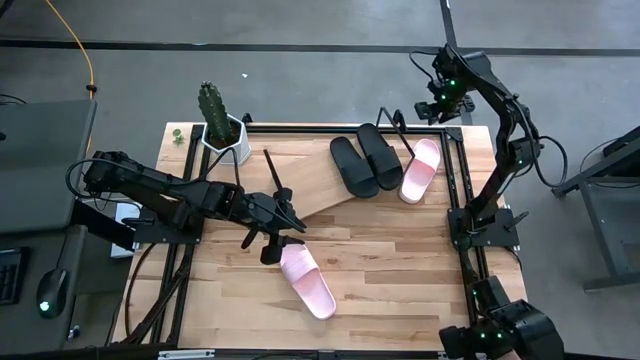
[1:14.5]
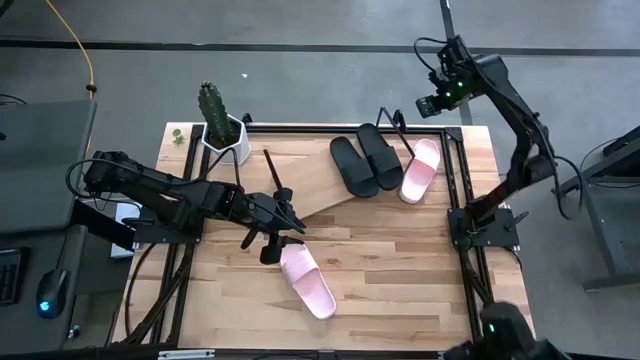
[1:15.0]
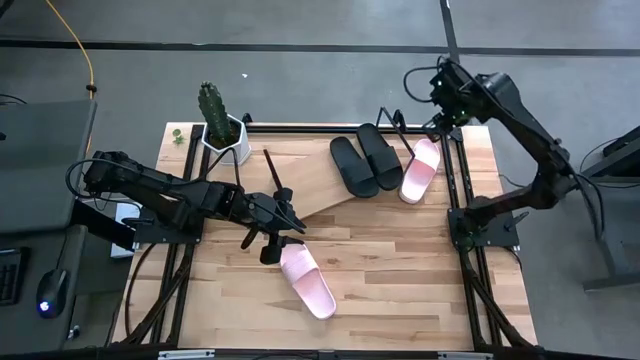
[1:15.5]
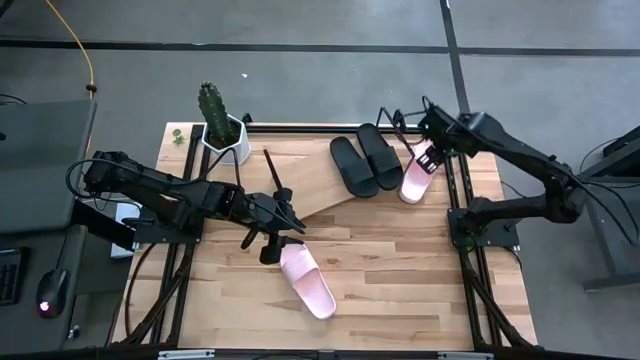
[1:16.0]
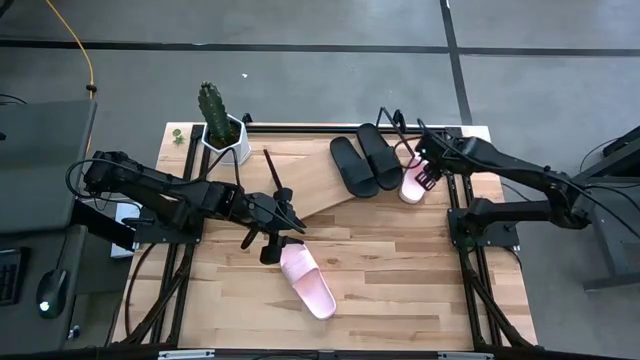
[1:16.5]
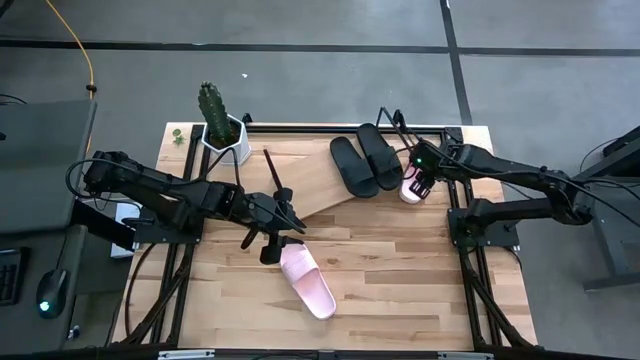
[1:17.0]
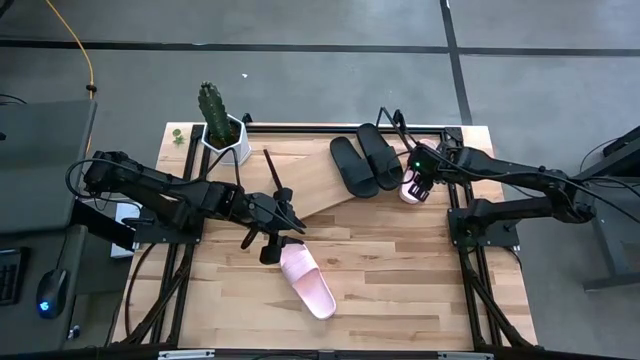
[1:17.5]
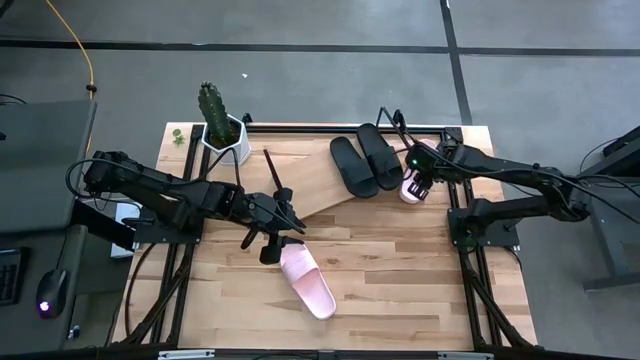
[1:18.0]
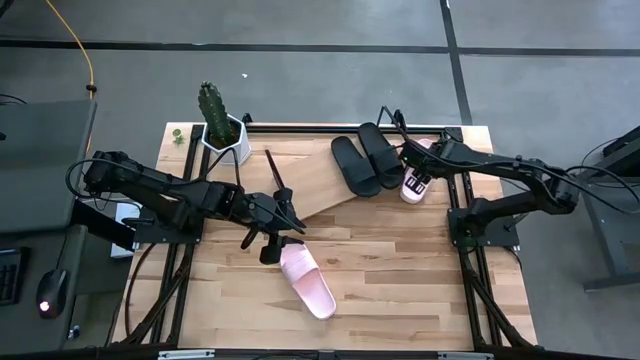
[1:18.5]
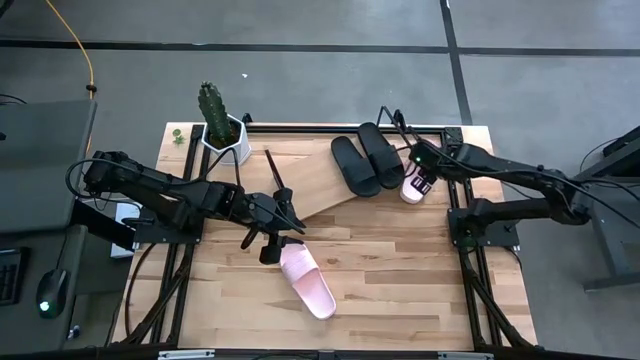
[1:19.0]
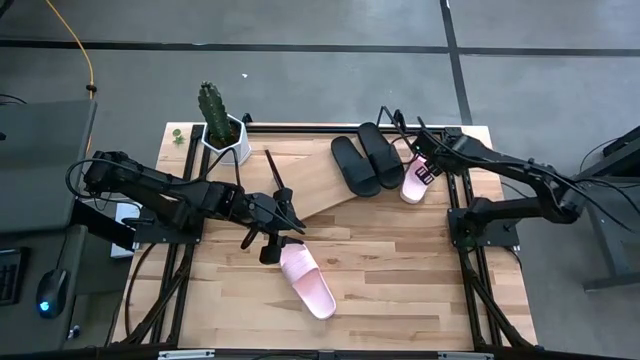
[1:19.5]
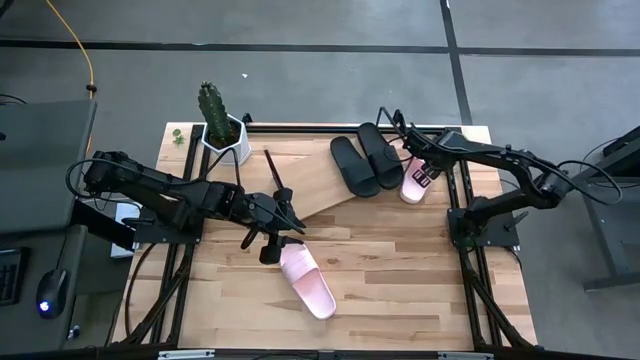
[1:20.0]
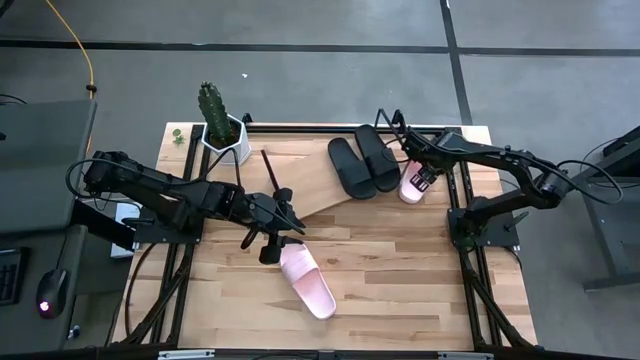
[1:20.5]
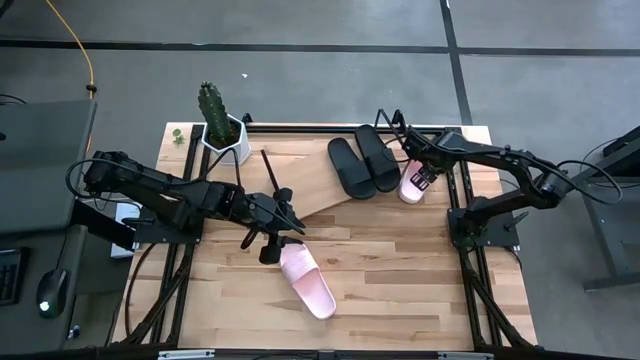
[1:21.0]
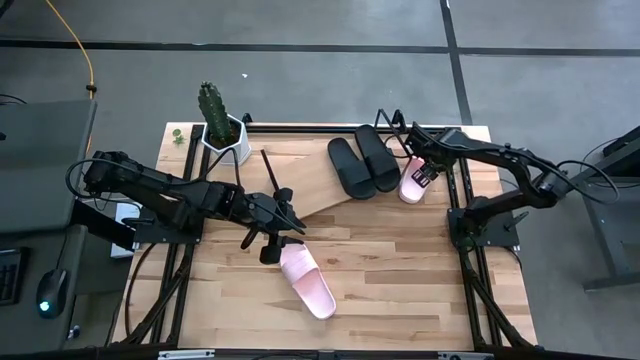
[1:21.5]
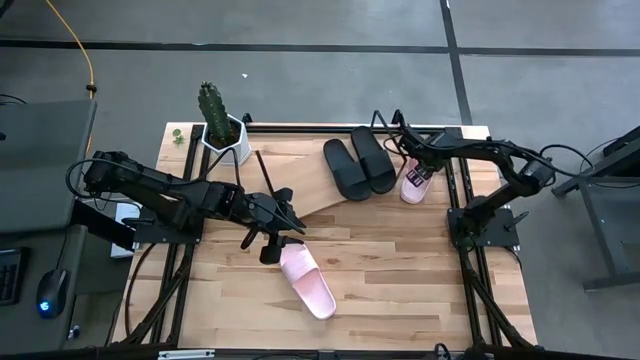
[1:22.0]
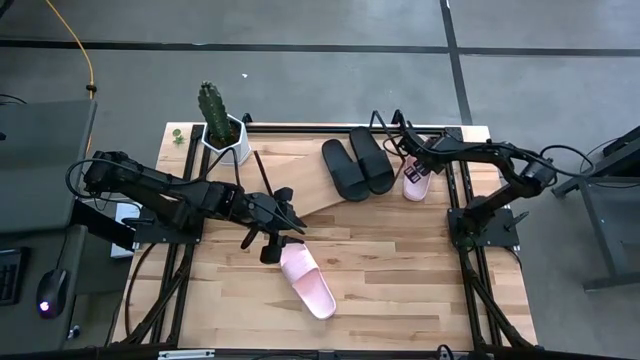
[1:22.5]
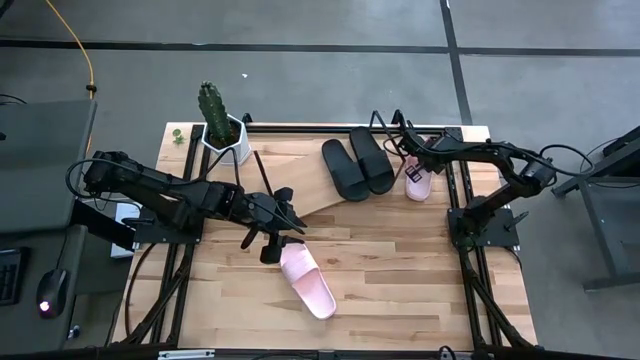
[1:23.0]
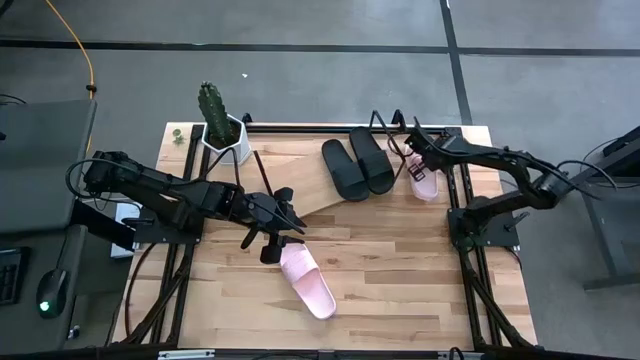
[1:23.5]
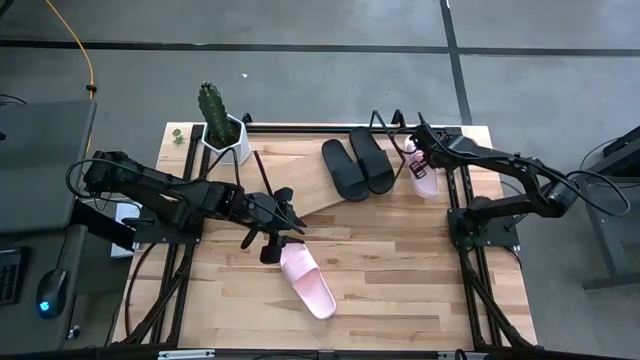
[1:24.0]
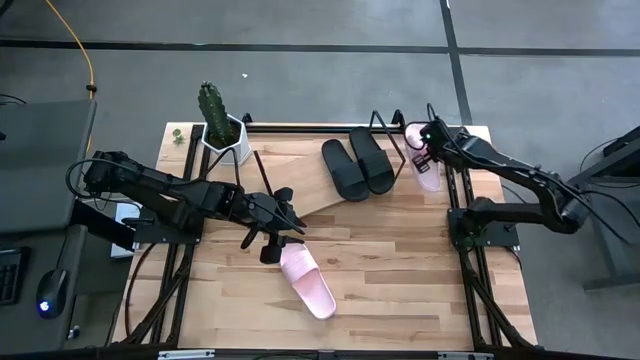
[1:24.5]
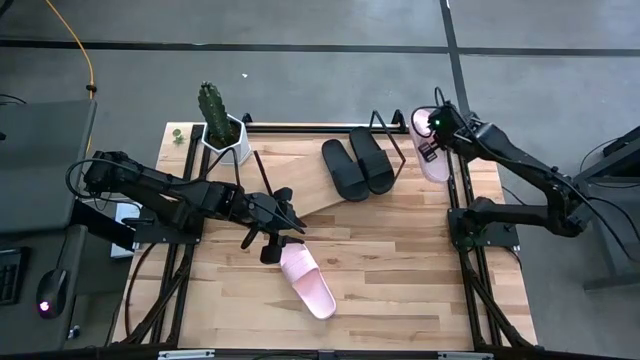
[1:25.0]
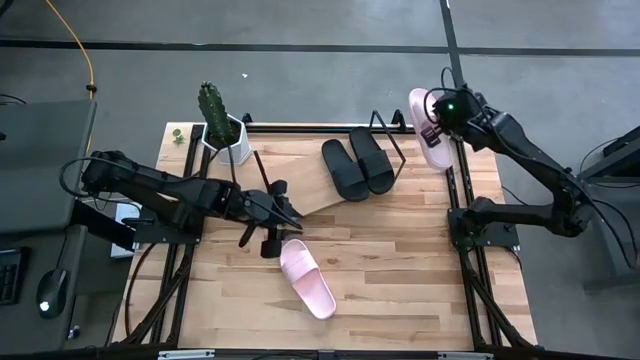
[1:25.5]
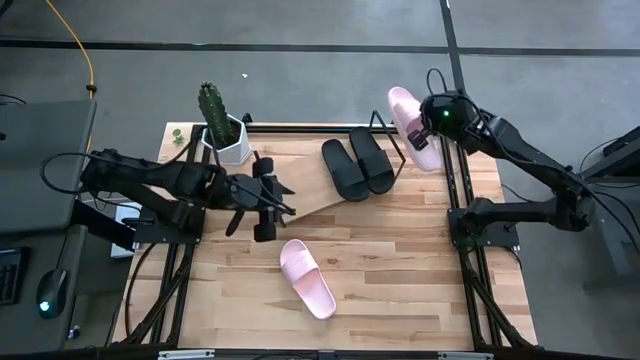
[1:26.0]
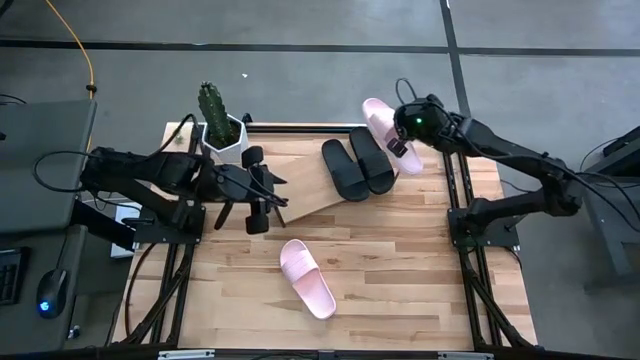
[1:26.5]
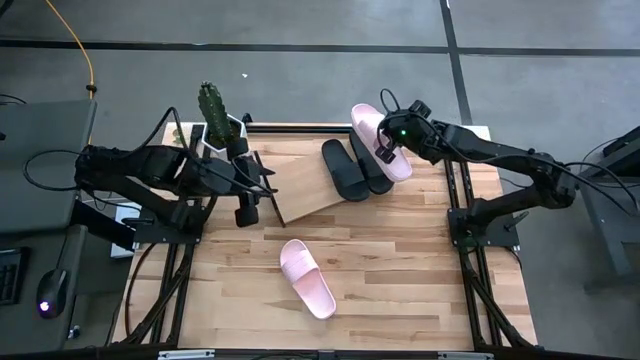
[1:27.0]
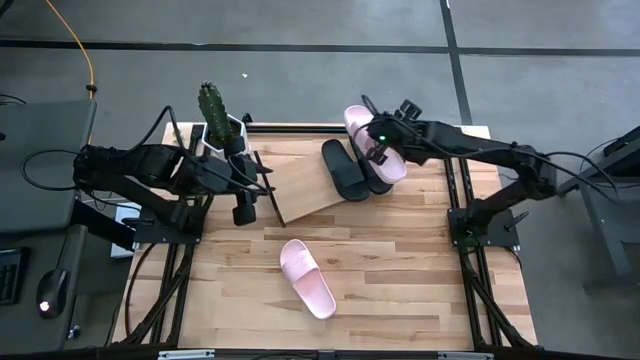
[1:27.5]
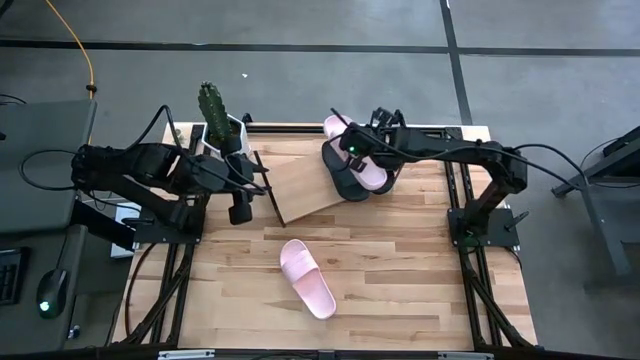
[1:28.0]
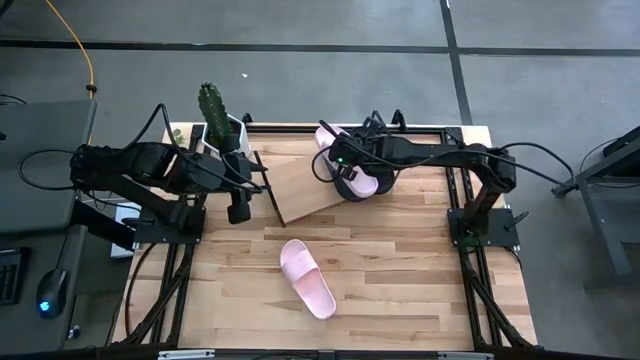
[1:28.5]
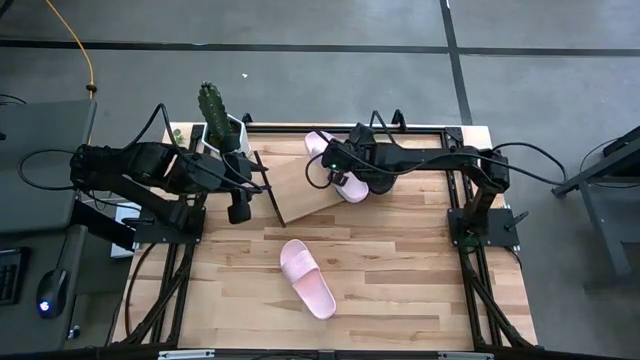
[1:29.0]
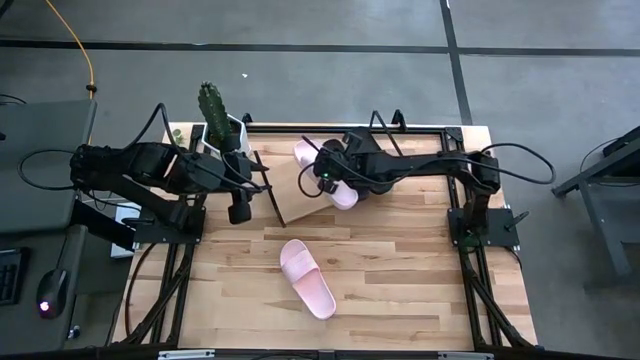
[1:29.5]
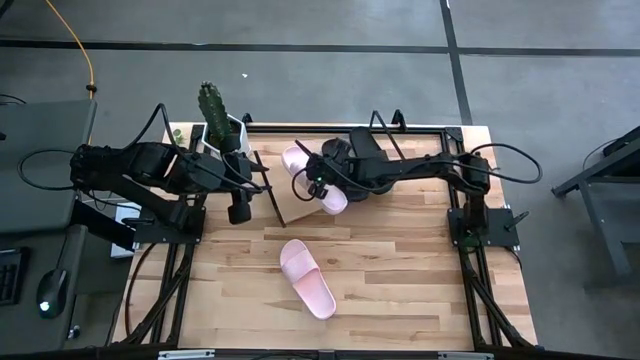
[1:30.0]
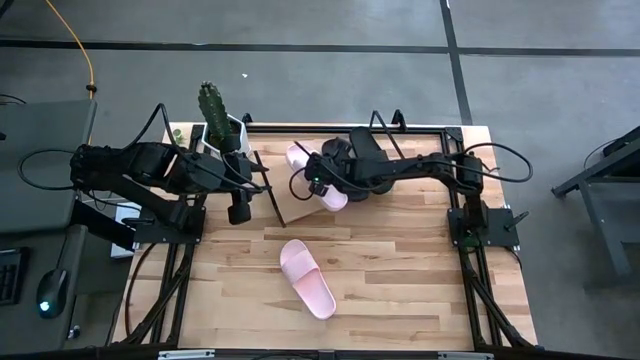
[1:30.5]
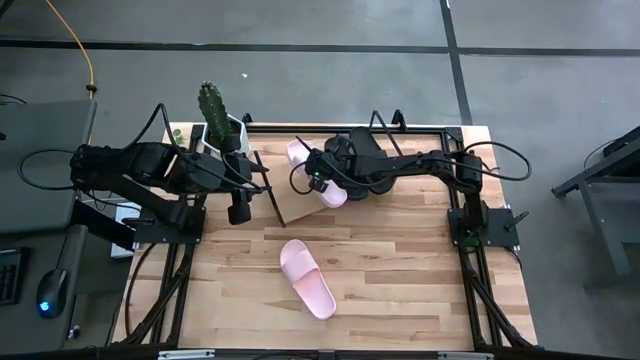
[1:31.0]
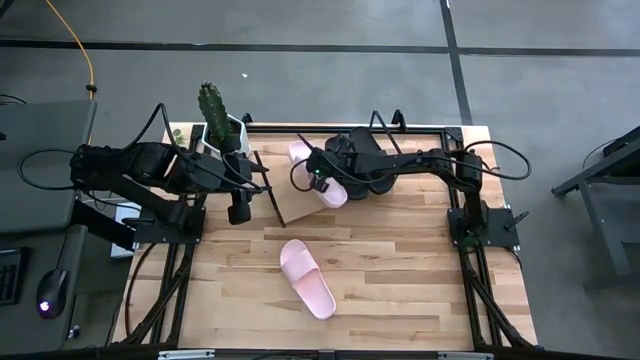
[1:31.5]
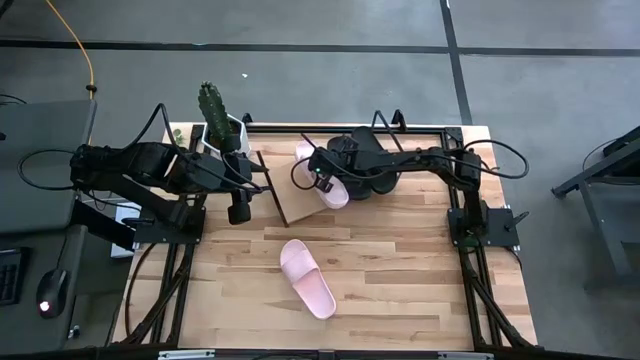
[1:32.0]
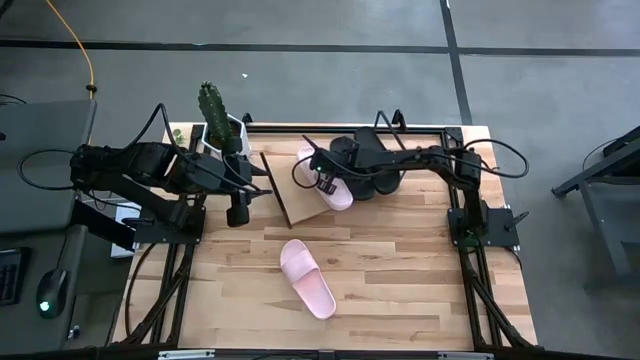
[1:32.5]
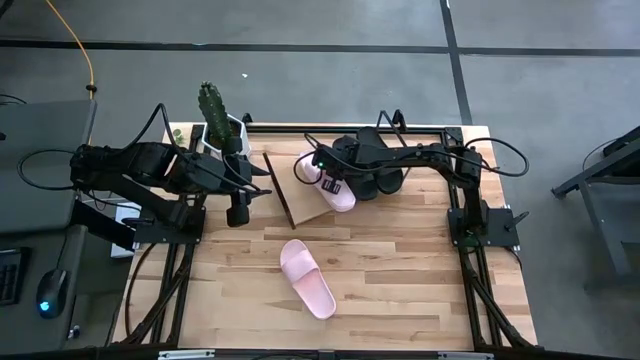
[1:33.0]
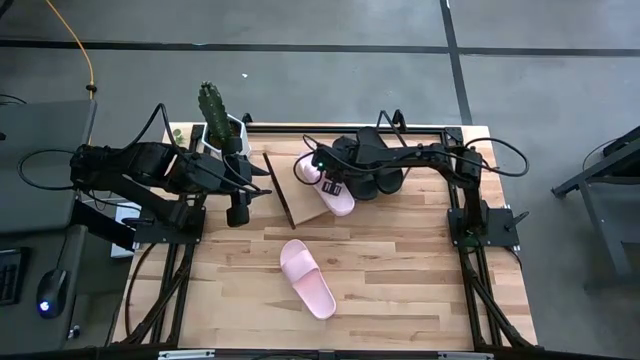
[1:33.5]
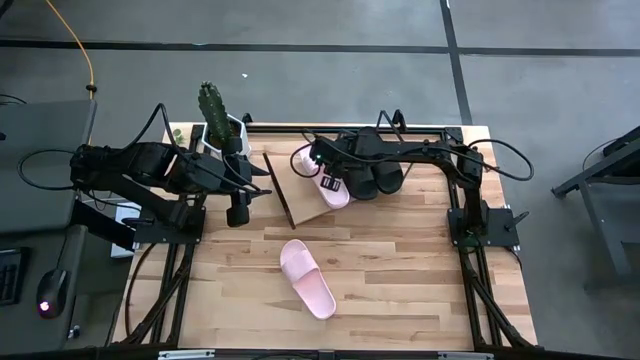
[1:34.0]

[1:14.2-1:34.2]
Task: Pick and place slides into the shelf
Put the top pink slide on the shelf
